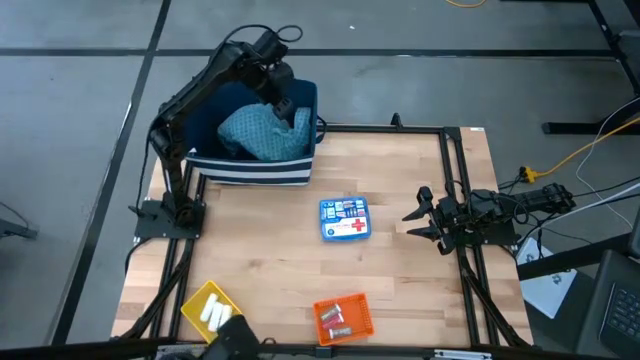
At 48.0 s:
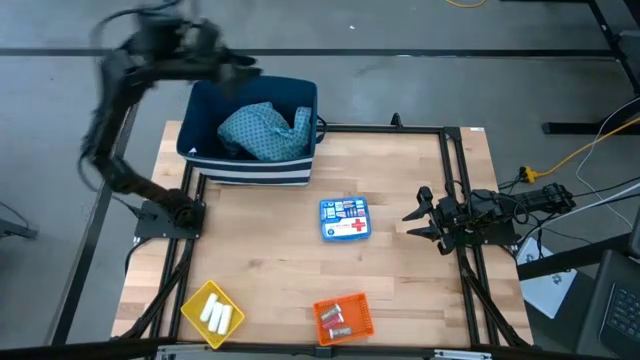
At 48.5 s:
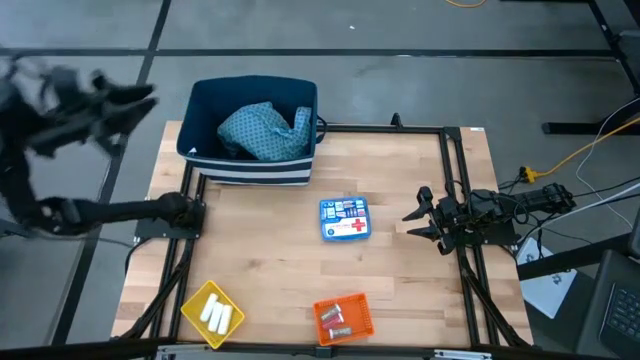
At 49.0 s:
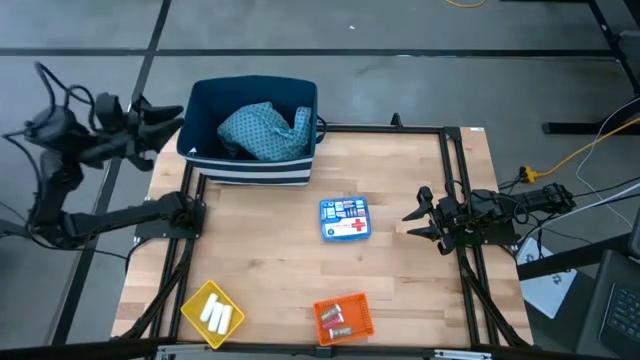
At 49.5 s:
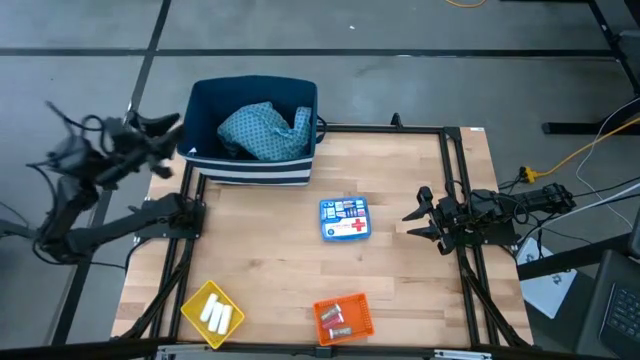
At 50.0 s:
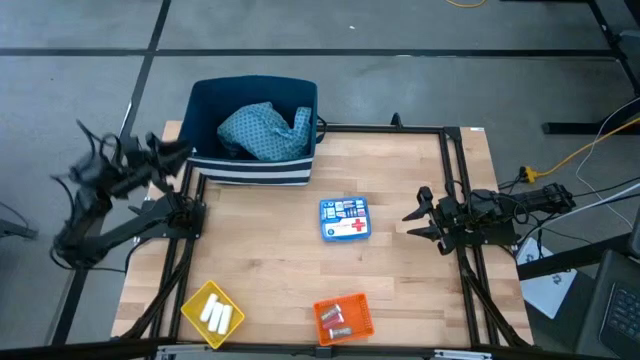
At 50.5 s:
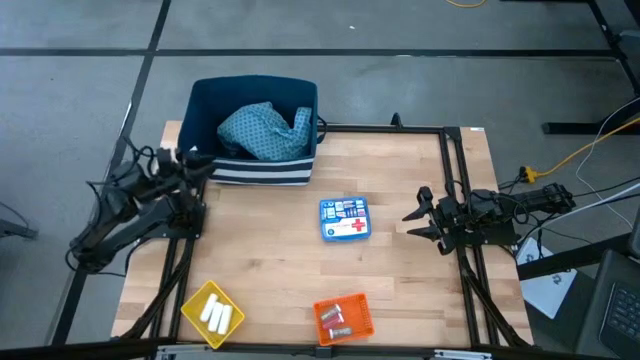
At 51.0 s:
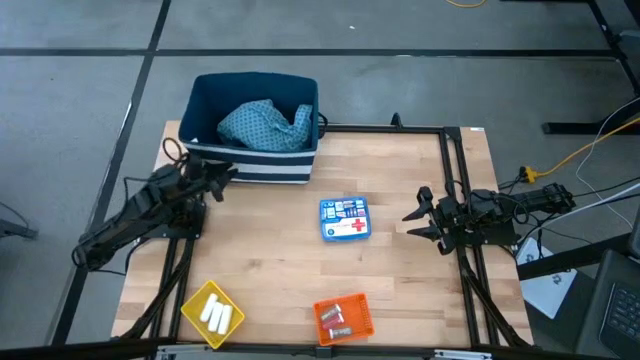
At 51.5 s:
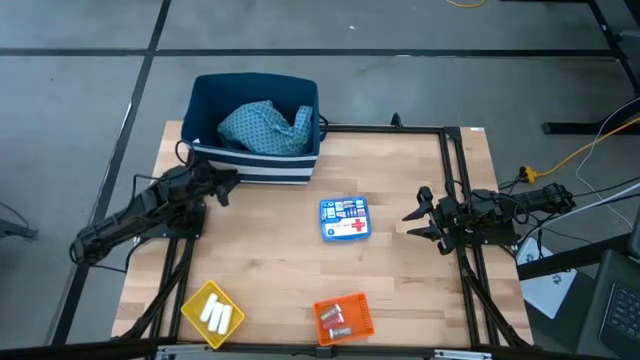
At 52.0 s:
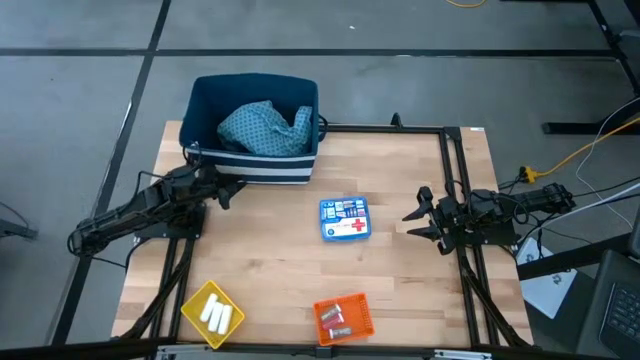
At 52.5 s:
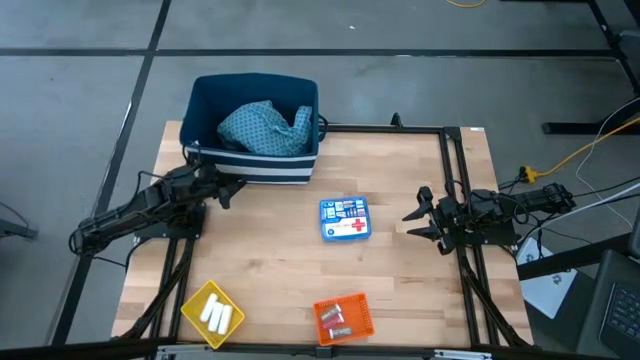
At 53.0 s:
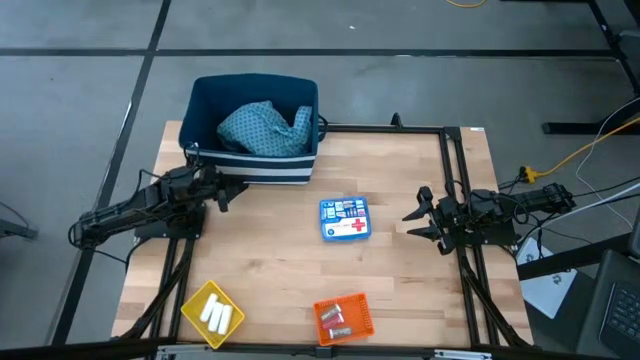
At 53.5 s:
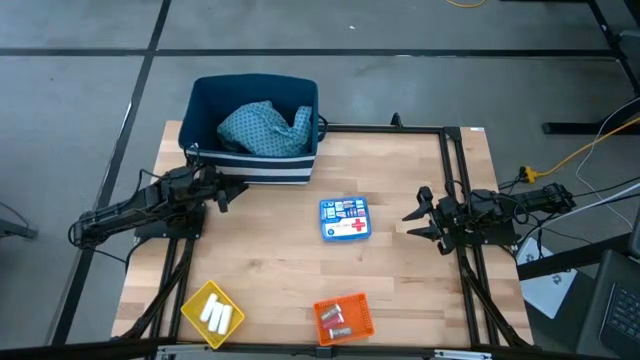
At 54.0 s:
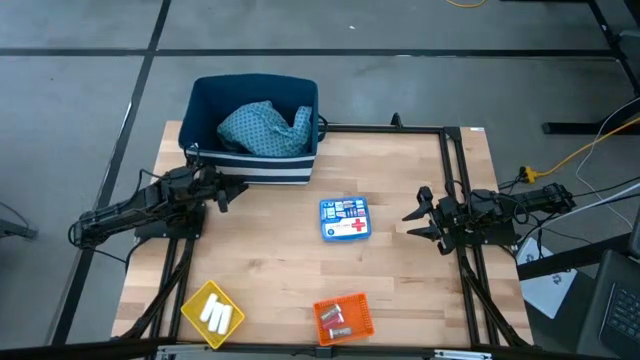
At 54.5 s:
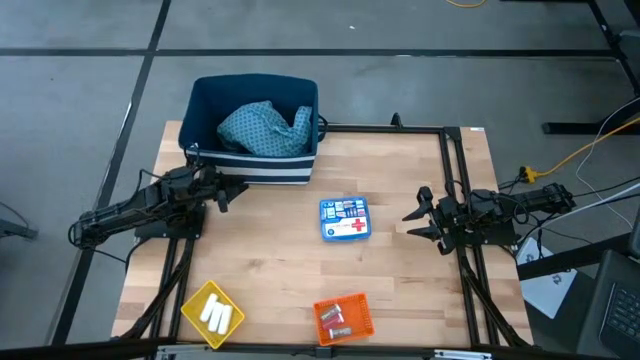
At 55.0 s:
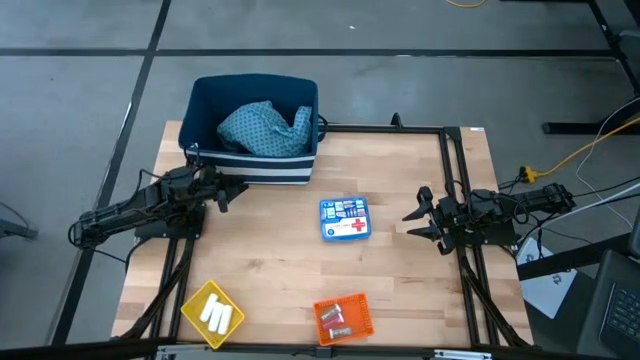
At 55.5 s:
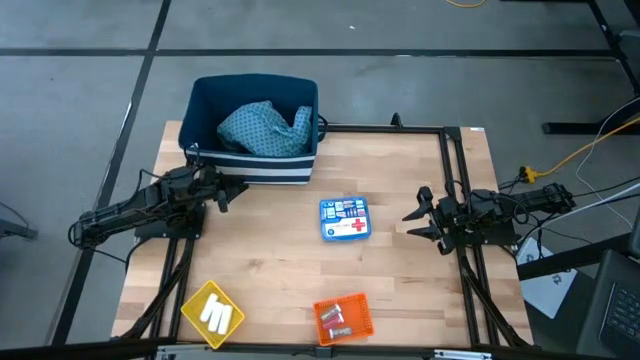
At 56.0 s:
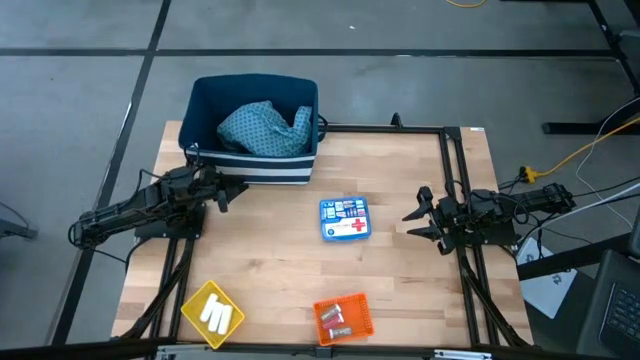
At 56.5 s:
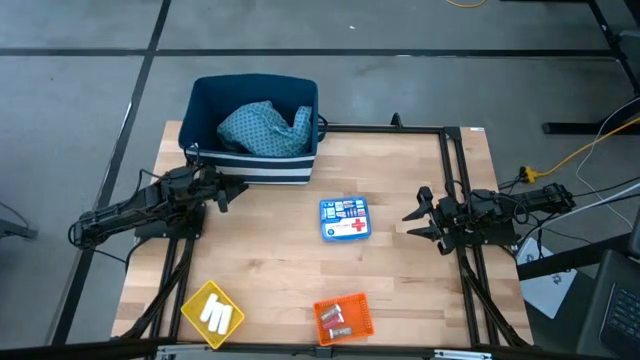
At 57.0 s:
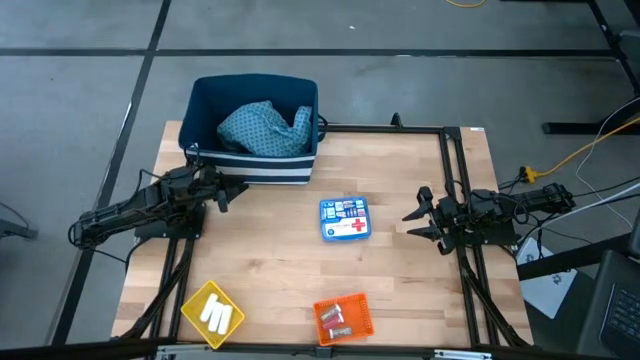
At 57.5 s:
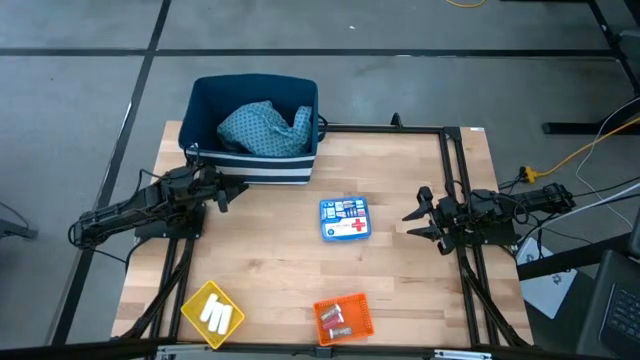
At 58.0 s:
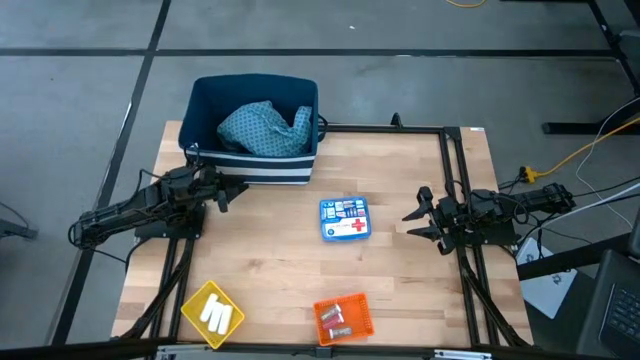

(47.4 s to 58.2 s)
Task: Pick & Place Medicine items
Return to Home Position

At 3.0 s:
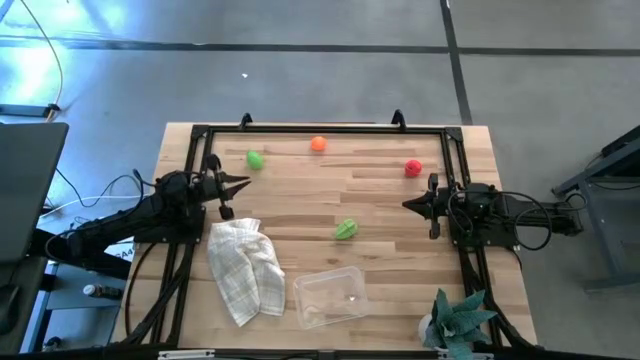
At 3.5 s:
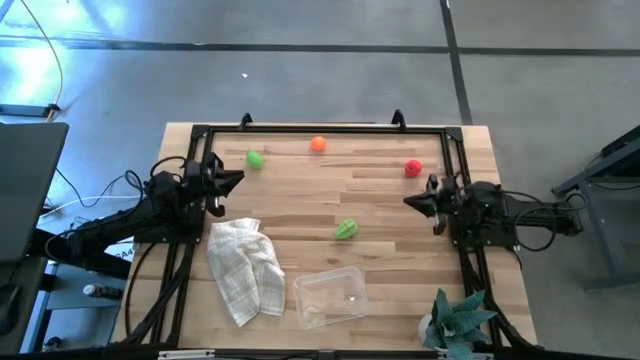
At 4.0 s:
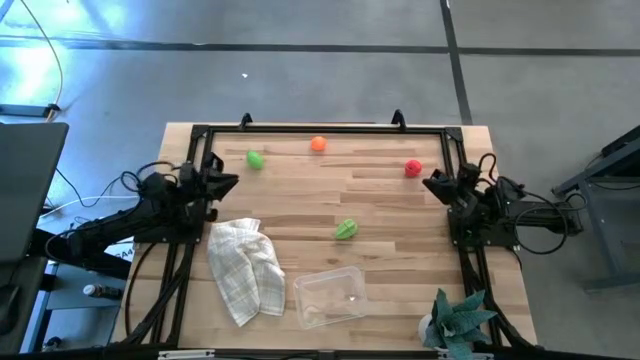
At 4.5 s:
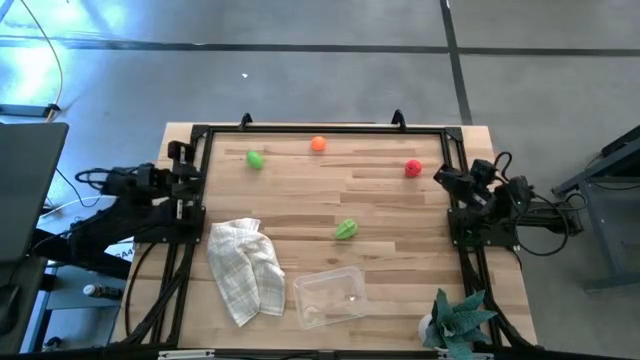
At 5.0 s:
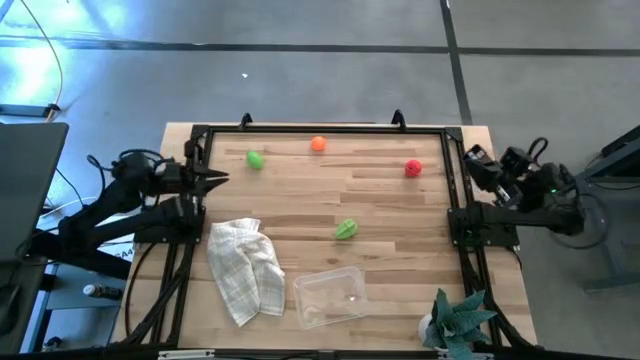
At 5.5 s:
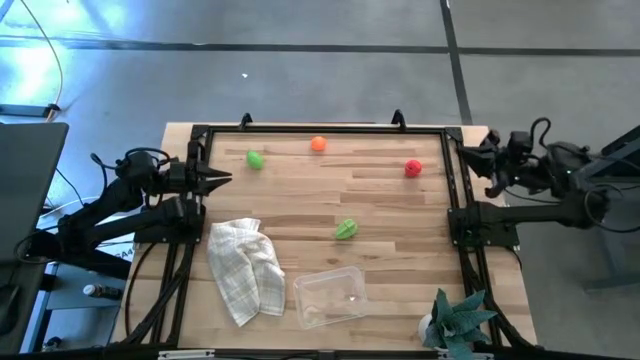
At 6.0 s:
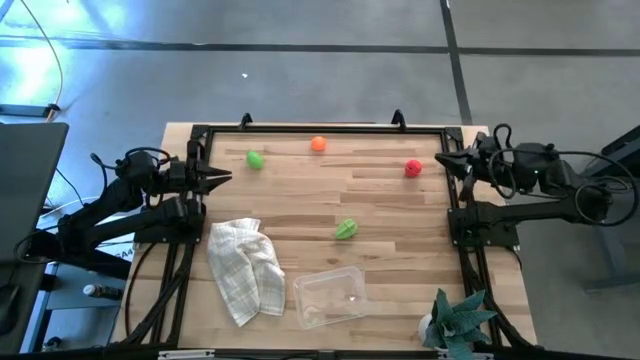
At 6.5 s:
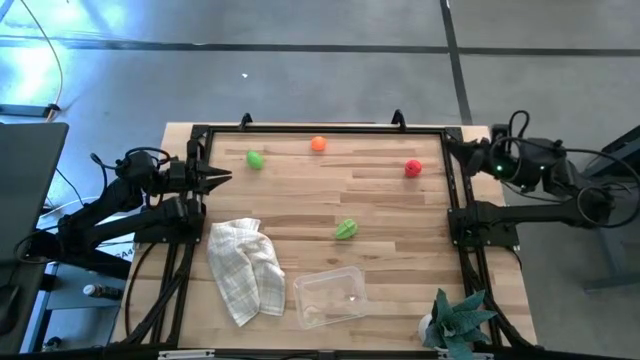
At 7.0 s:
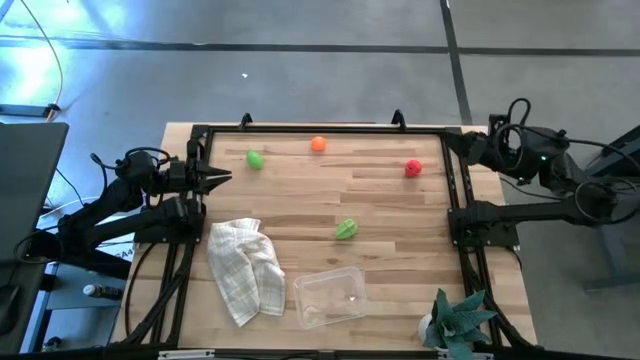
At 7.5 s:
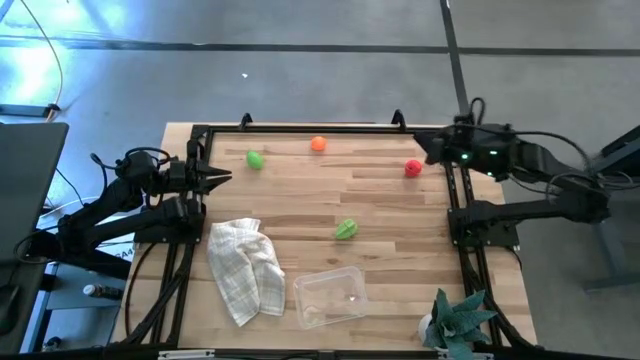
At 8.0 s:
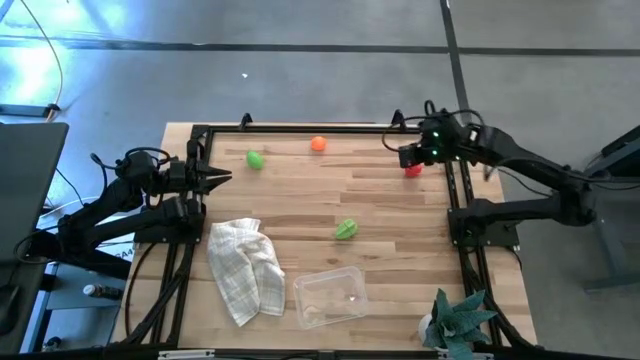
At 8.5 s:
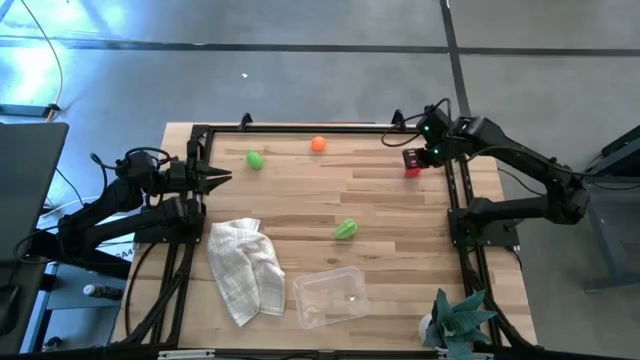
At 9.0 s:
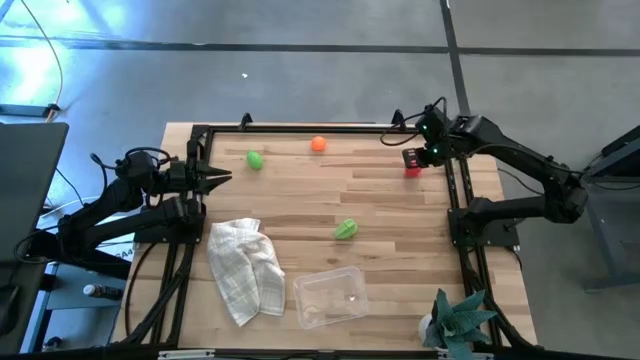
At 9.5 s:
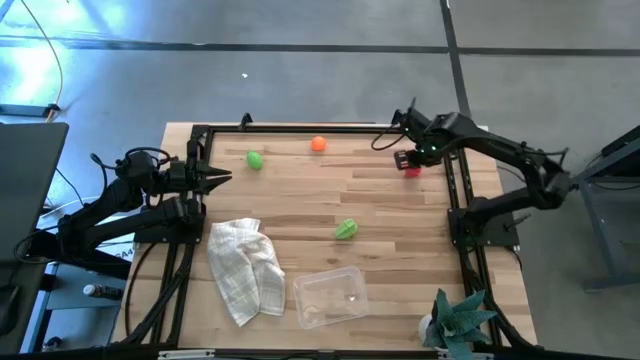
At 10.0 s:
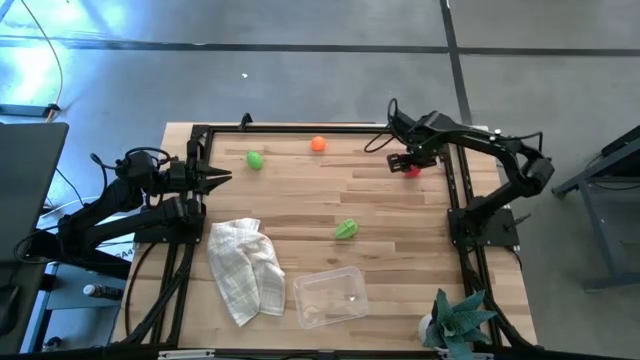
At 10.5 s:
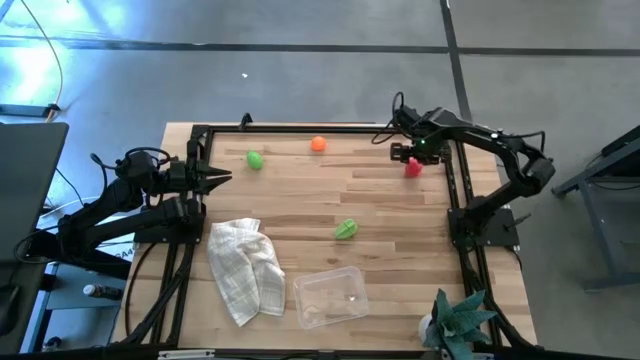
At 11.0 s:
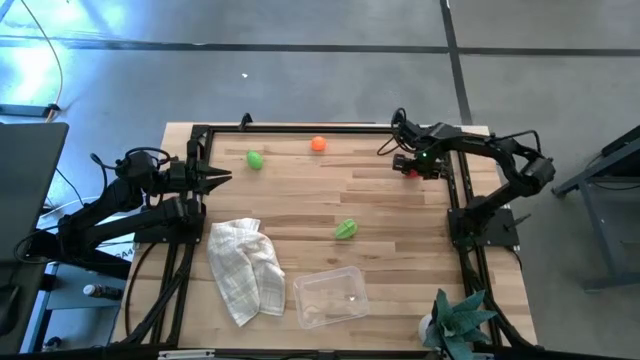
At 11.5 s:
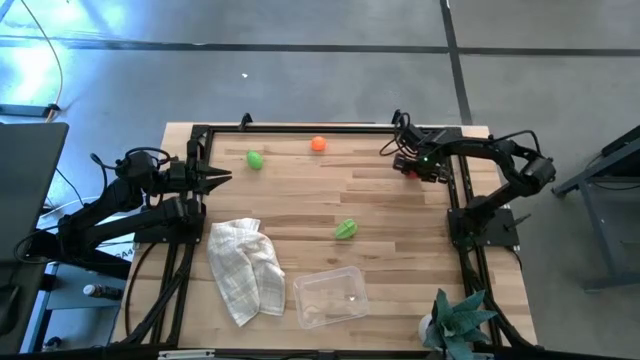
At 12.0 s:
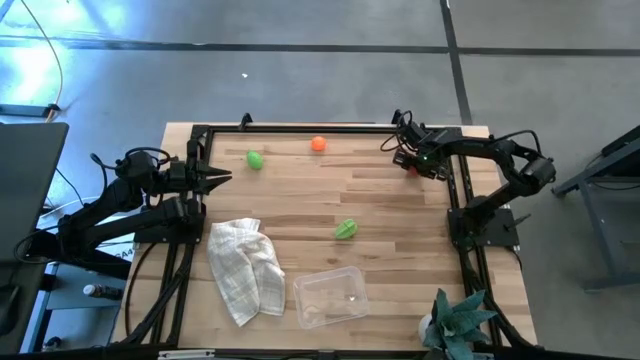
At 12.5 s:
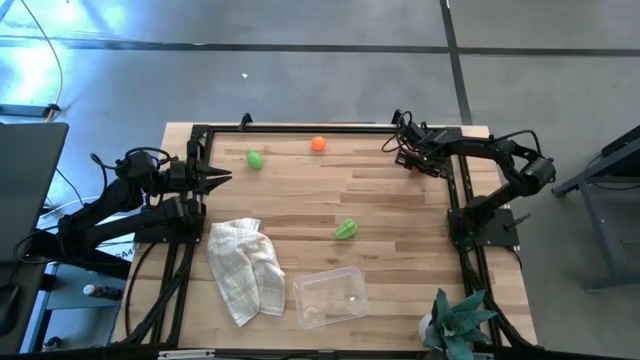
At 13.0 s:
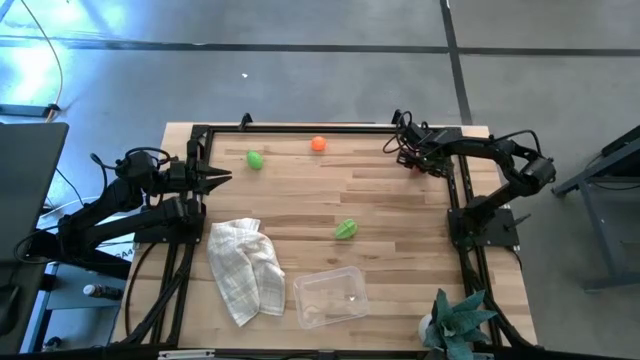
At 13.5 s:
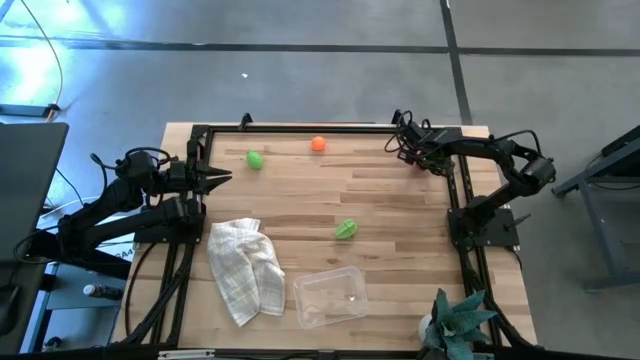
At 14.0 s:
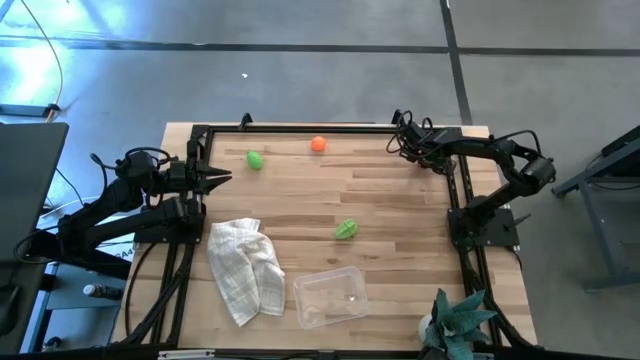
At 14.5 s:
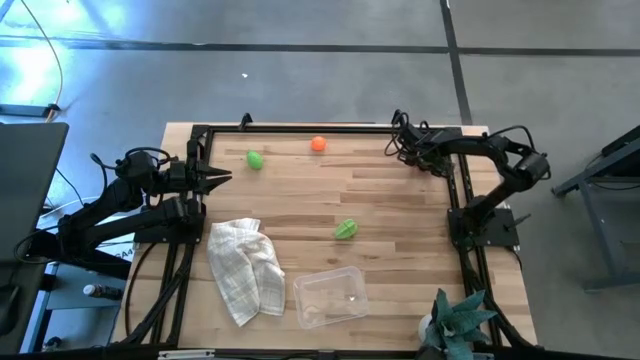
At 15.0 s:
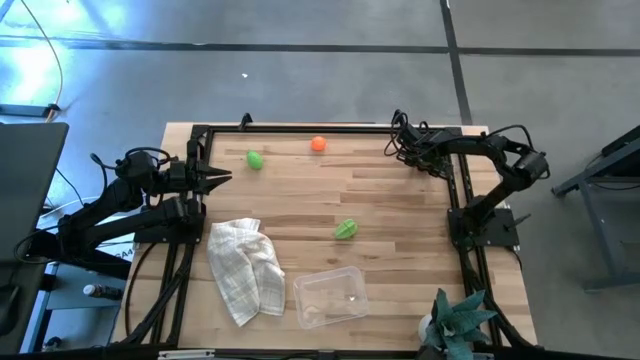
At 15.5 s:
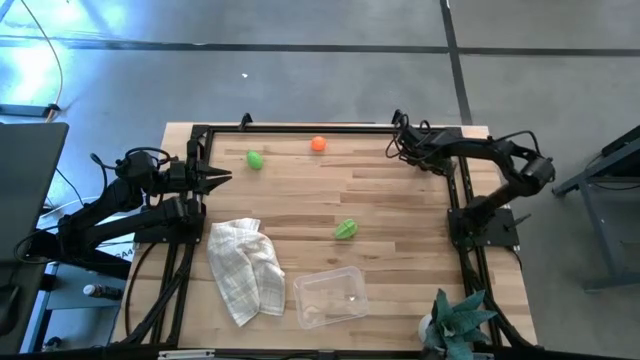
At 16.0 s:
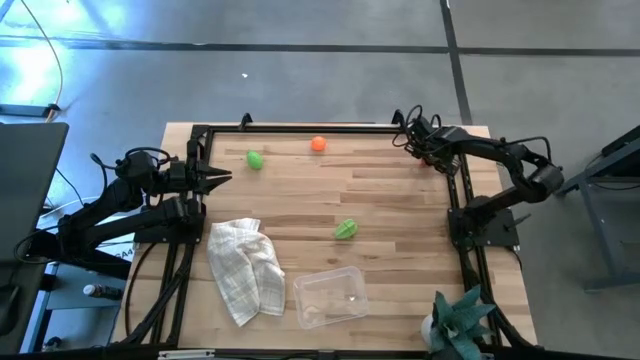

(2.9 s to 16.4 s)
Task: Pick and placing Produce into tupperware
Put the red apple into the transparent bin
